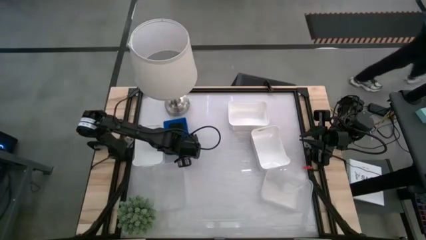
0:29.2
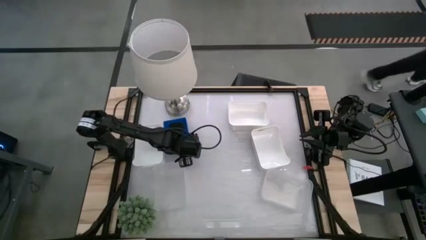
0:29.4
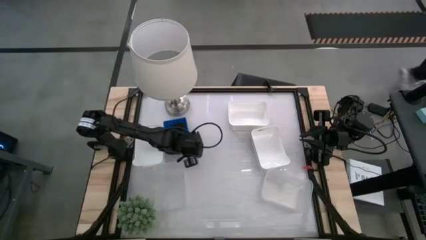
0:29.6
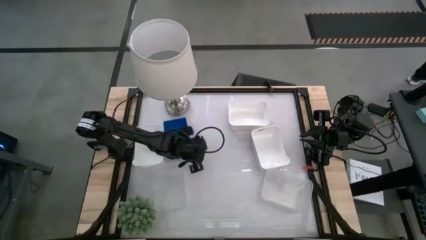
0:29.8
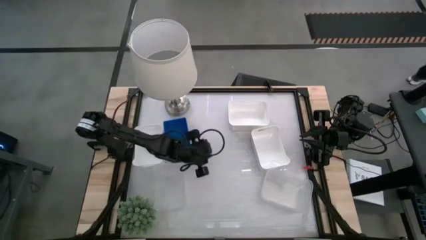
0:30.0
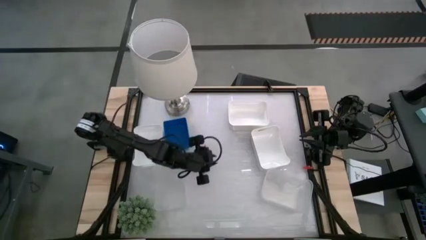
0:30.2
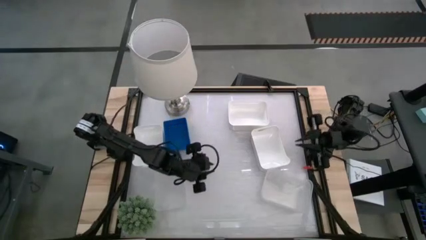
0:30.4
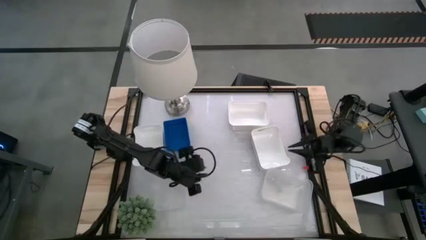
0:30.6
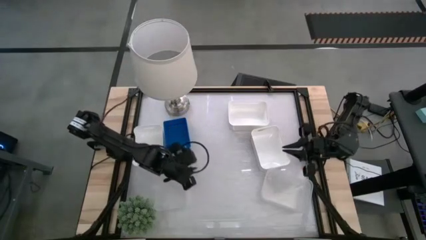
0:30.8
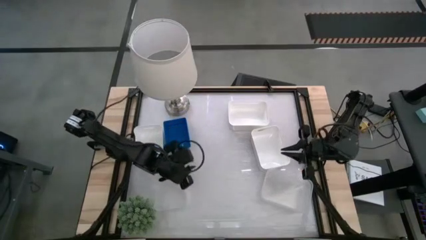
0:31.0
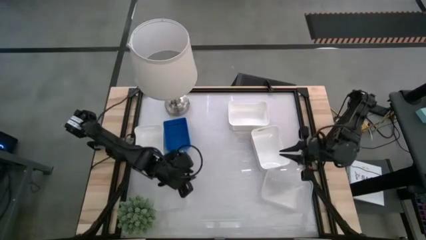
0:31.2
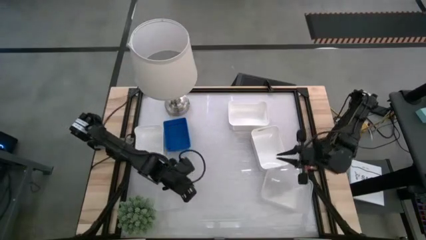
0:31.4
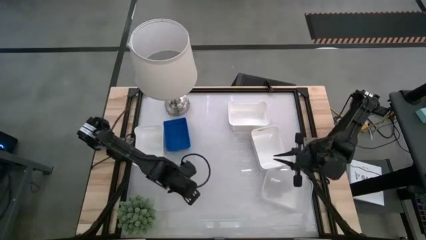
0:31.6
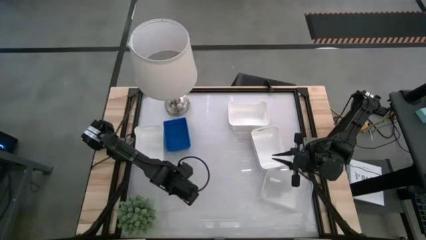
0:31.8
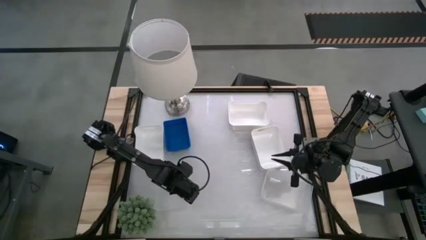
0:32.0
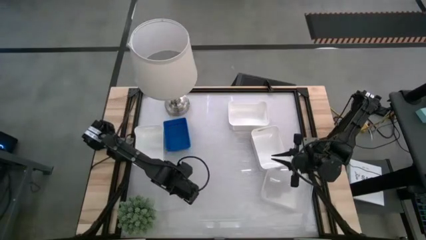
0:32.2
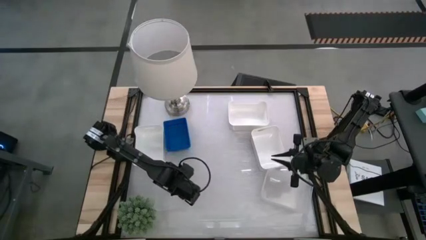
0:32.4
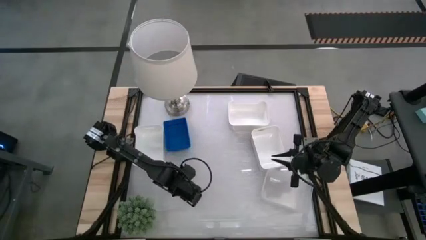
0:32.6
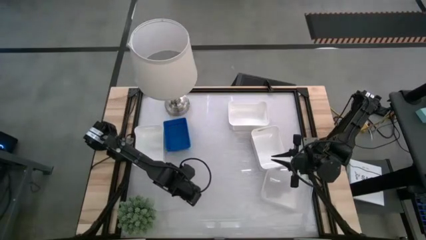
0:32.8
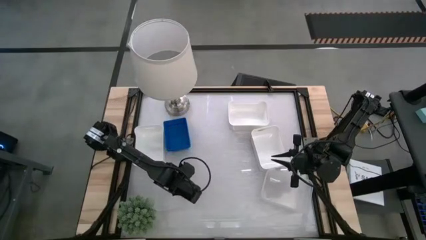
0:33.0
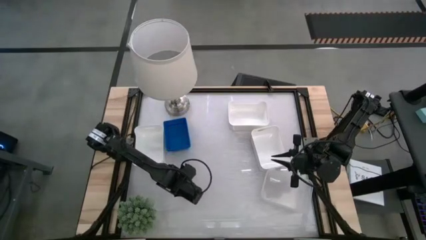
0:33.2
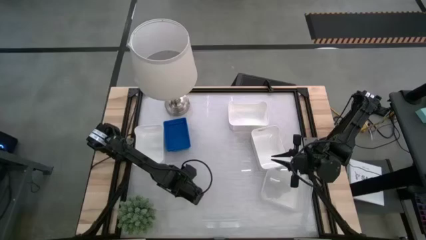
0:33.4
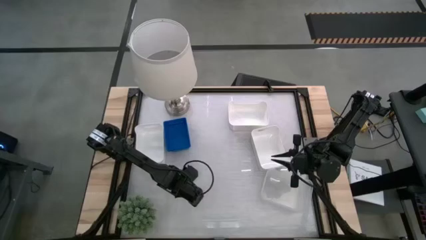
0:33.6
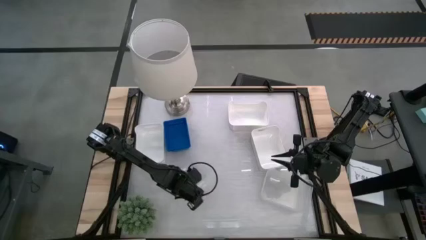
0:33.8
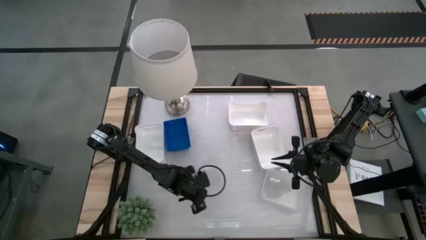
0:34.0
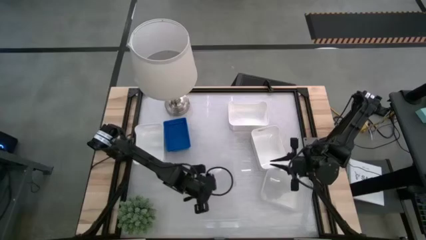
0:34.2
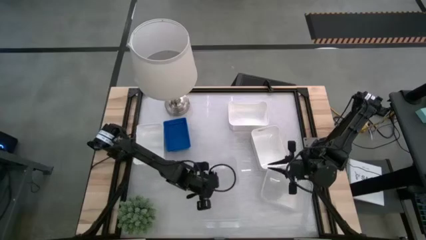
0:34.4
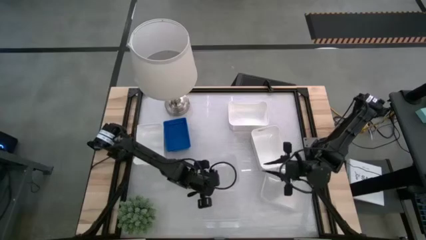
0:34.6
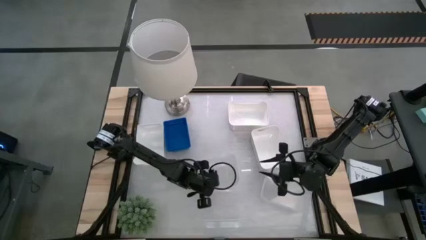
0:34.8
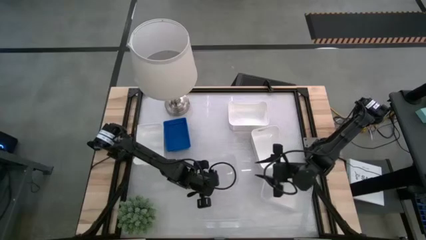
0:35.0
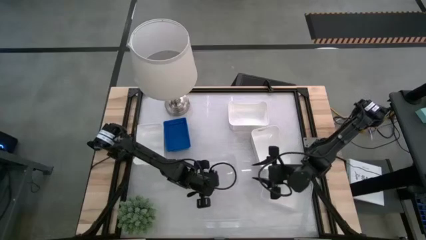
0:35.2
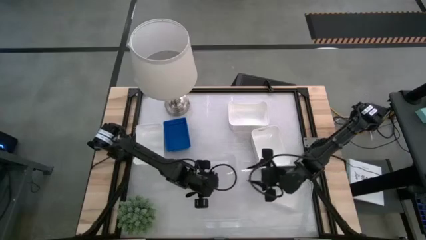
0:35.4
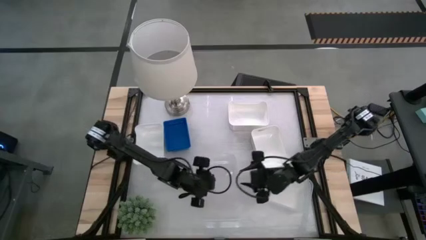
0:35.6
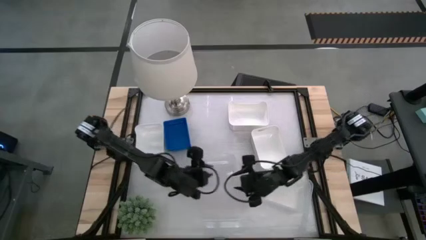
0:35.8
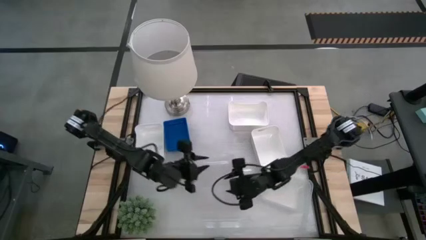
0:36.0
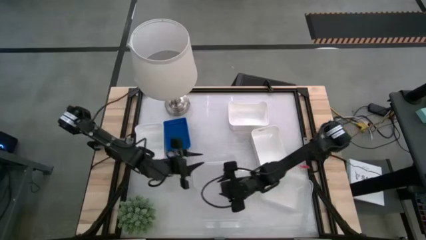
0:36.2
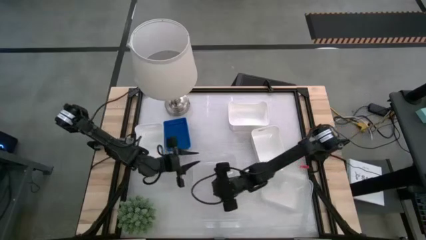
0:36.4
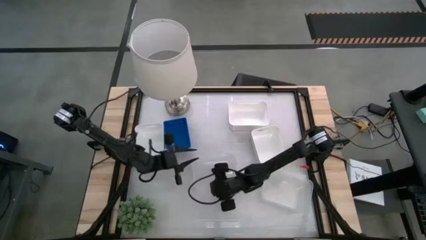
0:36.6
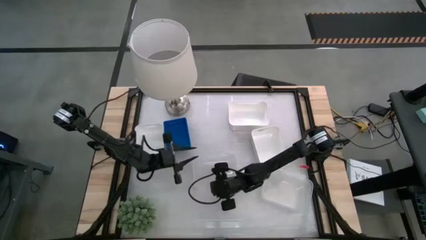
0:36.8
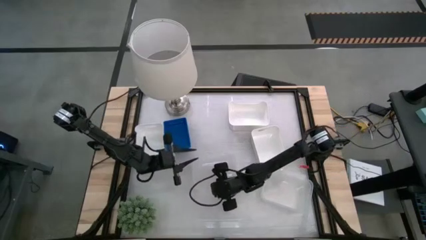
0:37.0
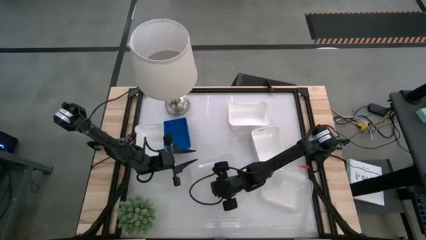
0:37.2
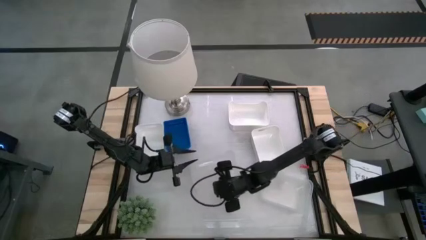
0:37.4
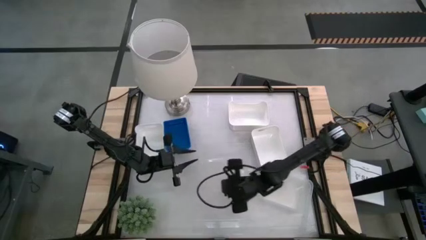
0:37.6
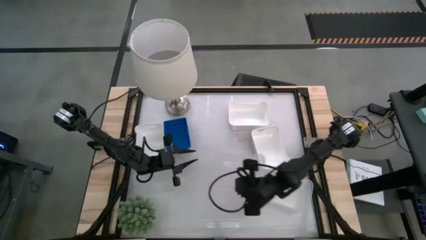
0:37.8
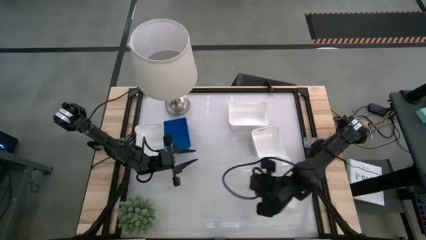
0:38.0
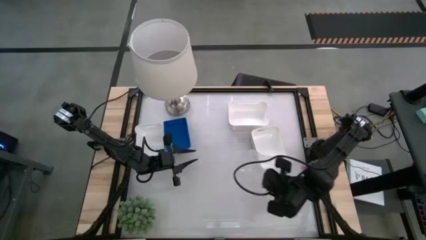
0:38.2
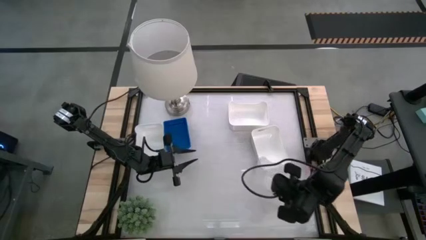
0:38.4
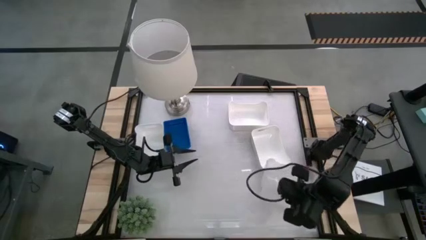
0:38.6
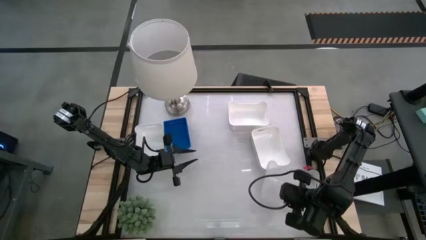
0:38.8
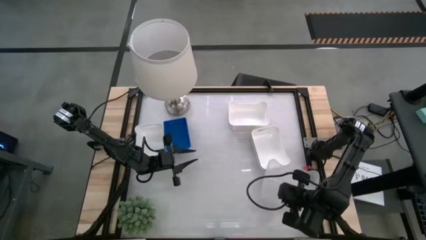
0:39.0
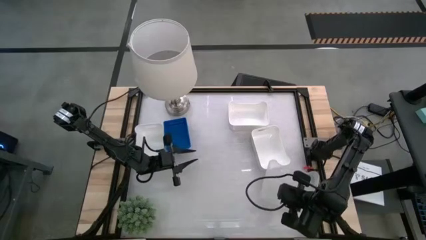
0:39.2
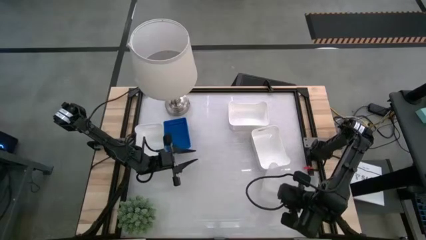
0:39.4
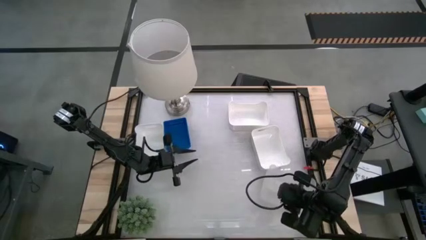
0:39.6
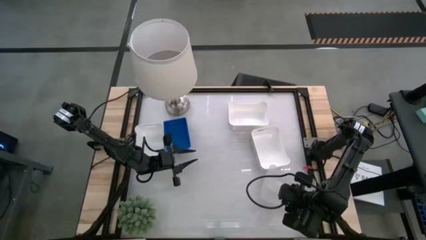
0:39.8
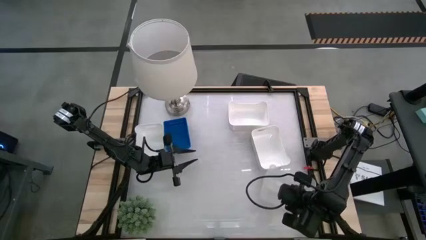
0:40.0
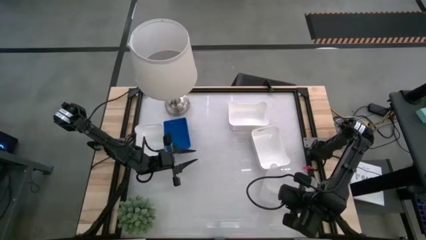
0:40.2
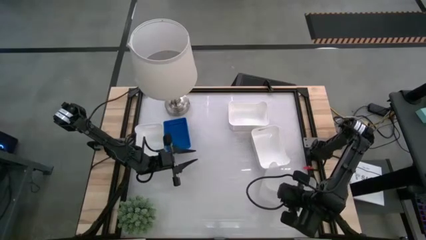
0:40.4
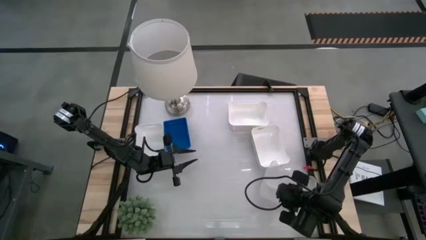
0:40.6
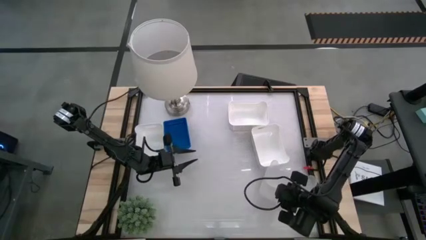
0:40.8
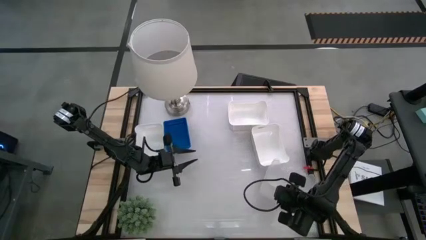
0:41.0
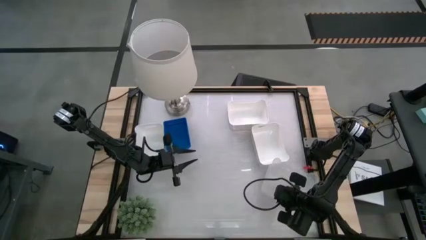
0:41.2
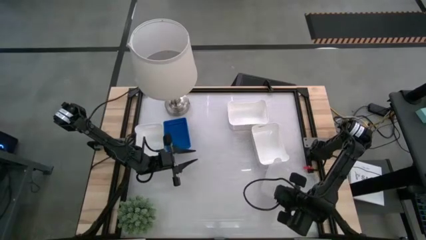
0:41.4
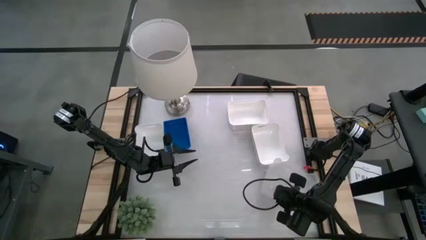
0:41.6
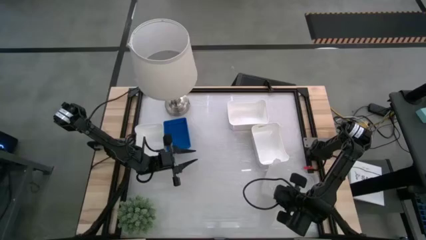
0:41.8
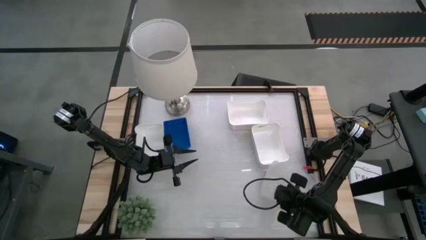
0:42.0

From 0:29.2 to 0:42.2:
Put the left transparent bin on top of the right transparent bin

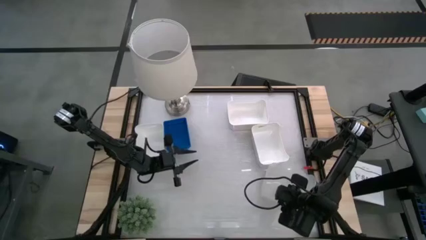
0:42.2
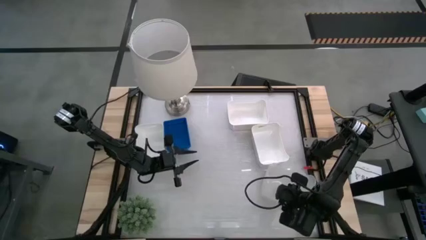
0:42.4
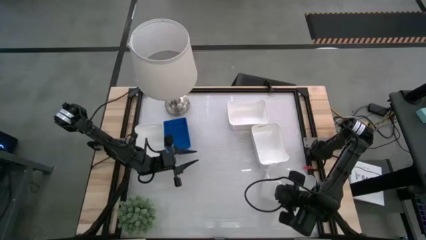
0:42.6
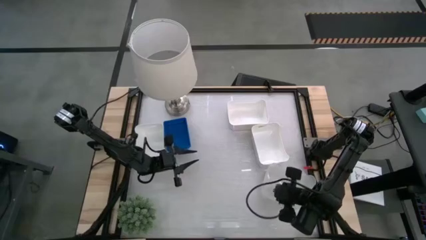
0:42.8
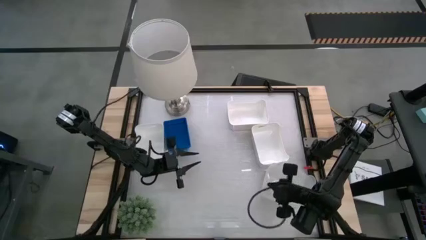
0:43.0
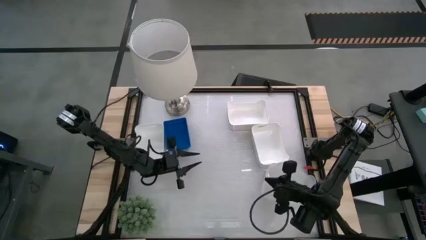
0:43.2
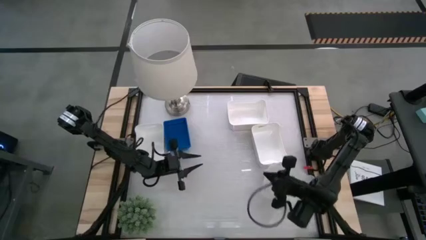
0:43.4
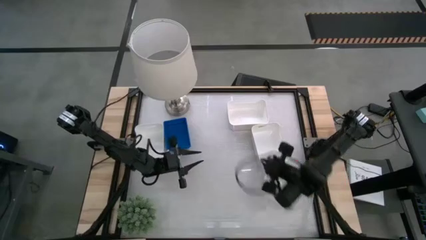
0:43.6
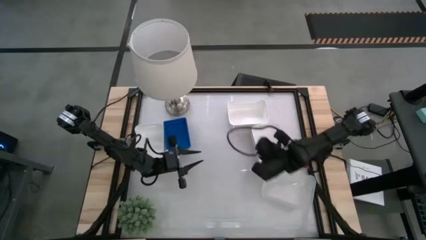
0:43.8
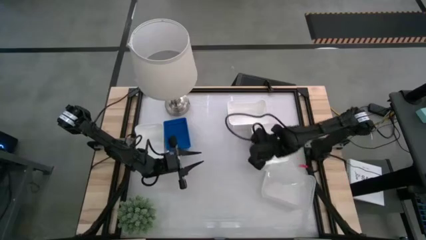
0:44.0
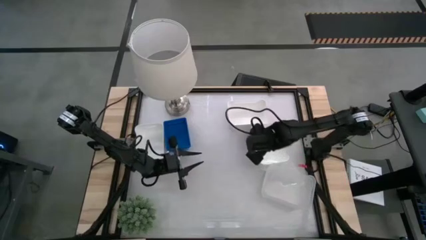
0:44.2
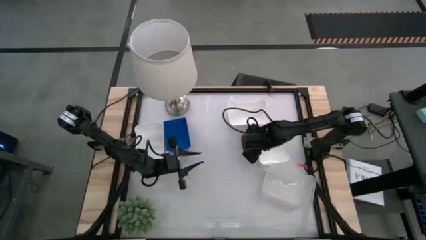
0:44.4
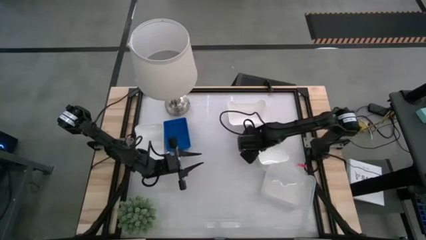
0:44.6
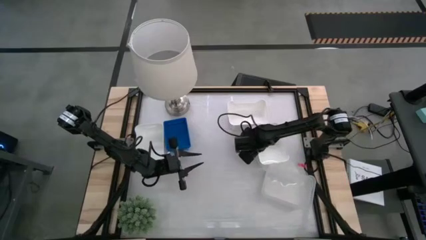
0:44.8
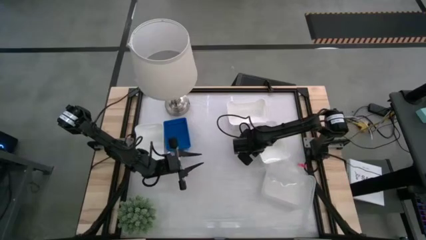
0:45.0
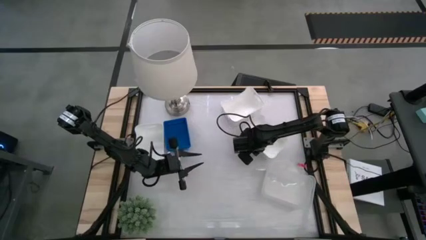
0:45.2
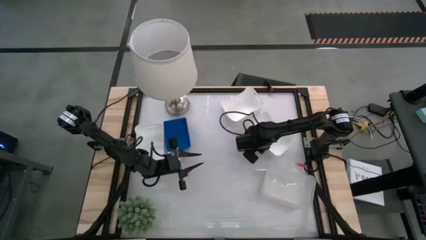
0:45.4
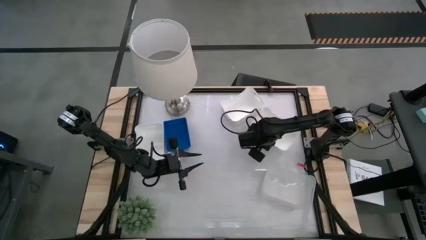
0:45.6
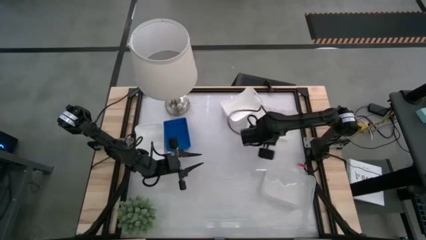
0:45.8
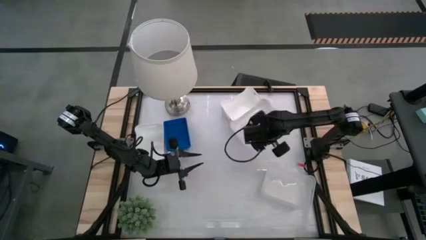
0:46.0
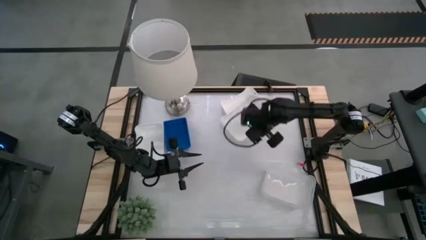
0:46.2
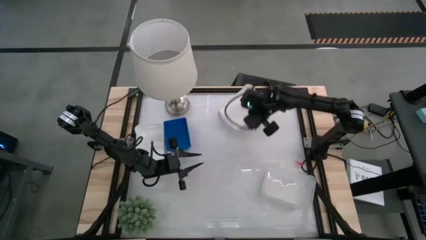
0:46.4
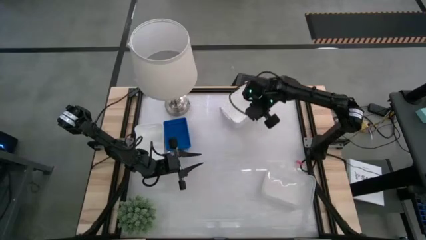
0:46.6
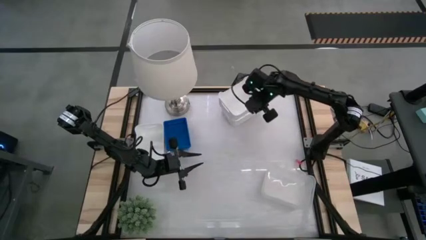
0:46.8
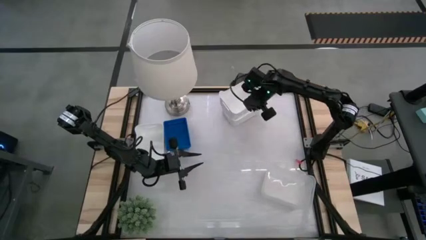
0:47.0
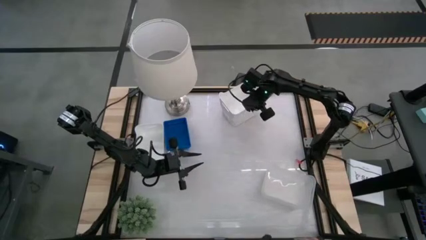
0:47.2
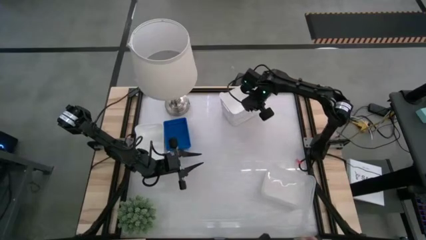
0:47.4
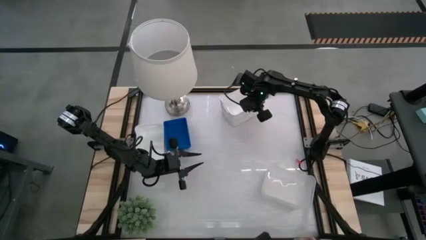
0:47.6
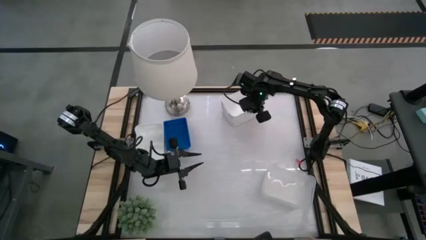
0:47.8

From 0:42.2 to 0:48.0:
Stack the bottom right white bin on top of the top white bin
